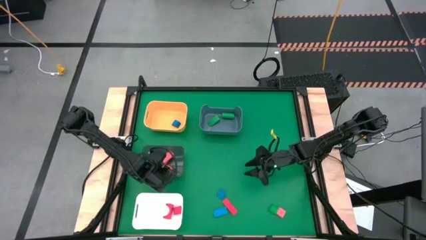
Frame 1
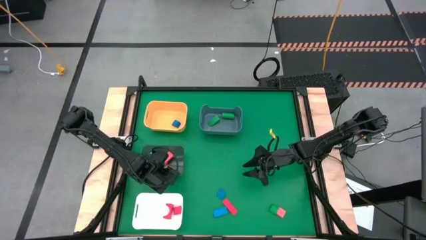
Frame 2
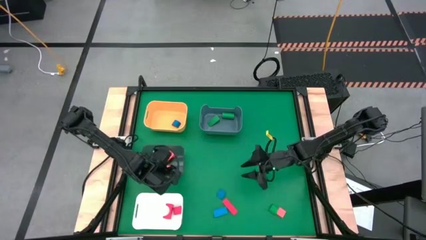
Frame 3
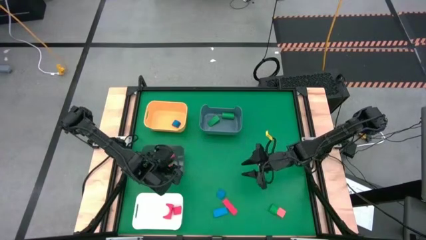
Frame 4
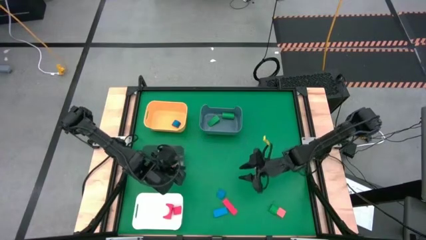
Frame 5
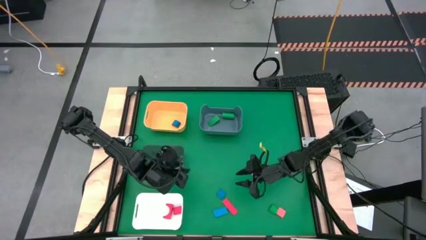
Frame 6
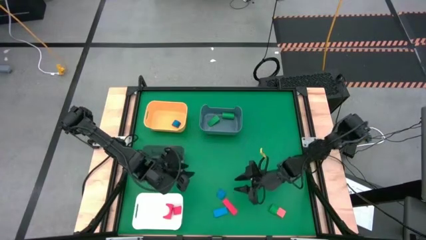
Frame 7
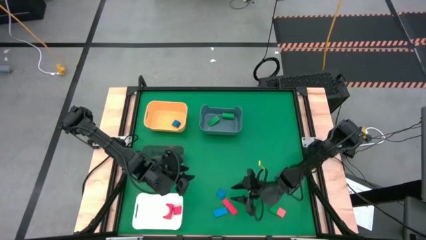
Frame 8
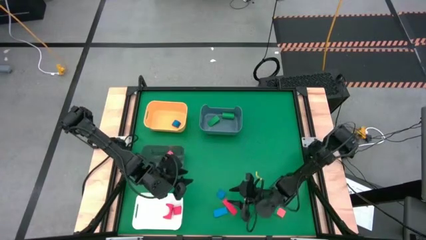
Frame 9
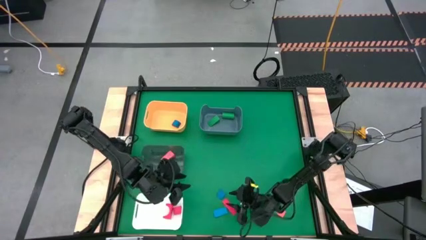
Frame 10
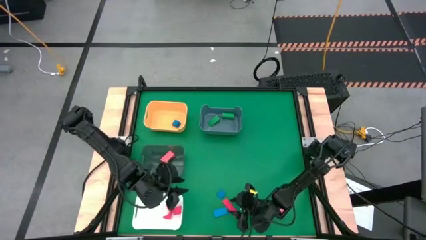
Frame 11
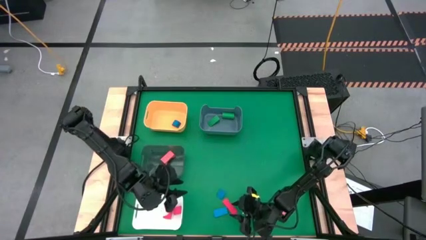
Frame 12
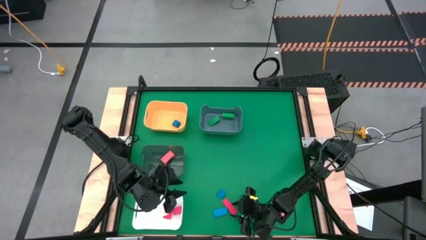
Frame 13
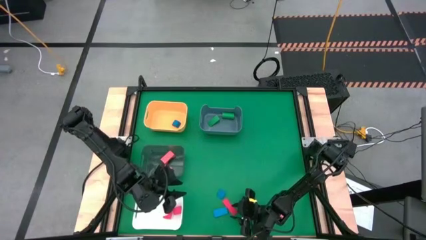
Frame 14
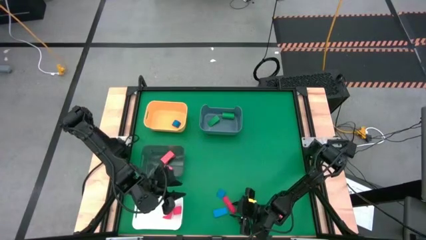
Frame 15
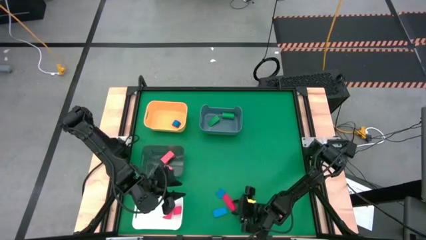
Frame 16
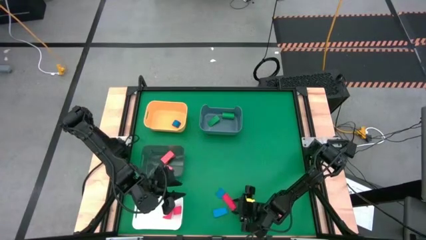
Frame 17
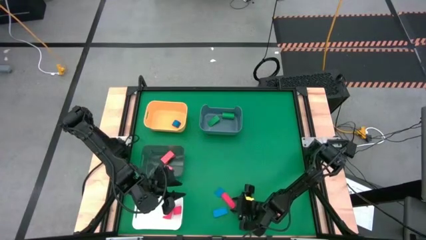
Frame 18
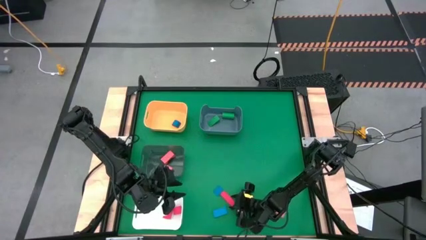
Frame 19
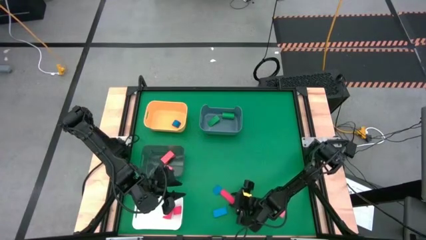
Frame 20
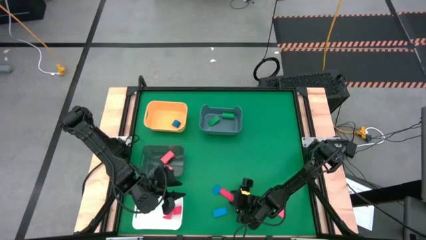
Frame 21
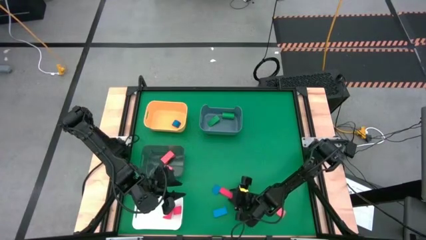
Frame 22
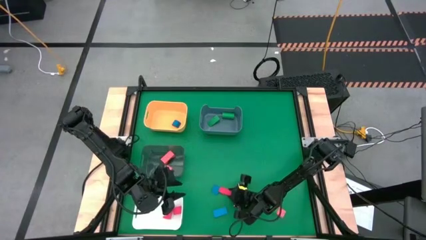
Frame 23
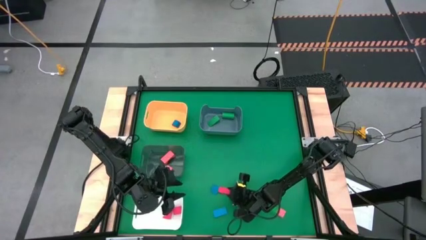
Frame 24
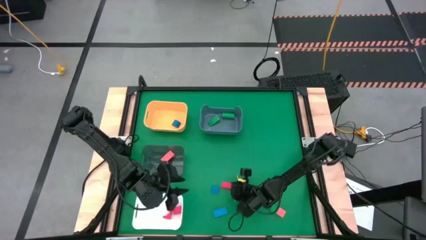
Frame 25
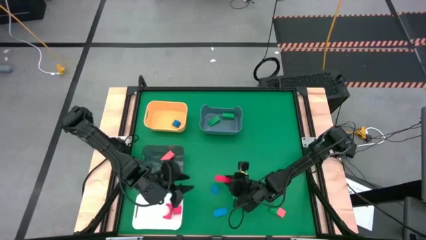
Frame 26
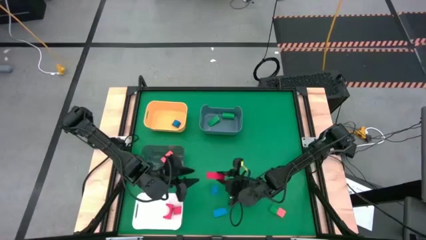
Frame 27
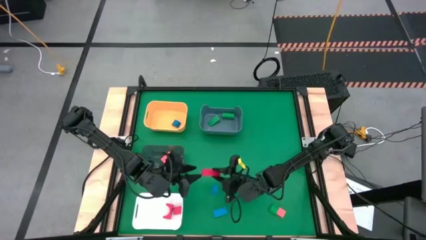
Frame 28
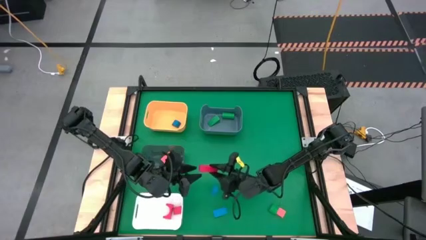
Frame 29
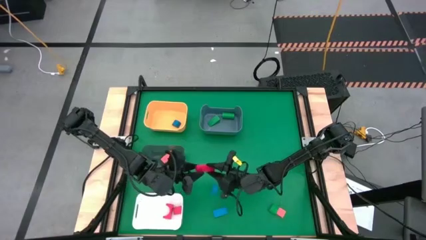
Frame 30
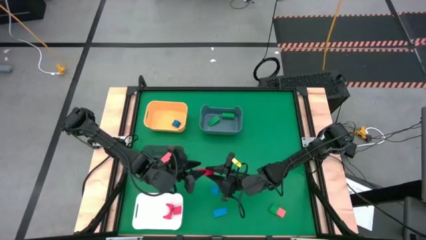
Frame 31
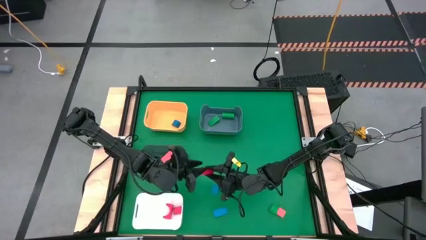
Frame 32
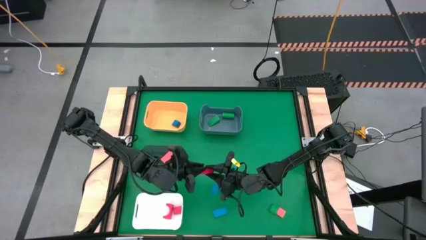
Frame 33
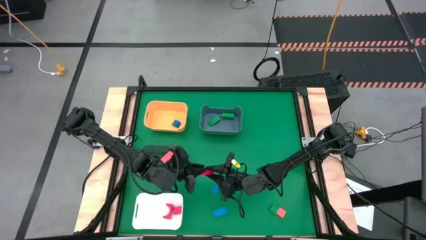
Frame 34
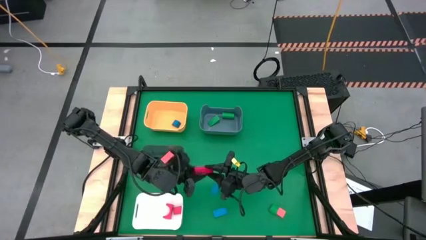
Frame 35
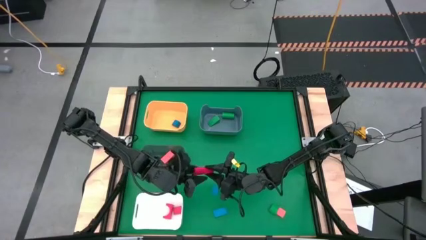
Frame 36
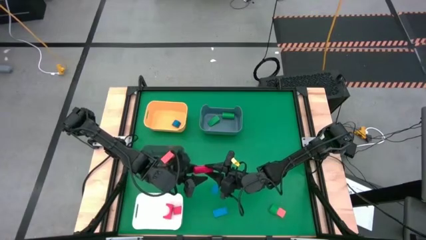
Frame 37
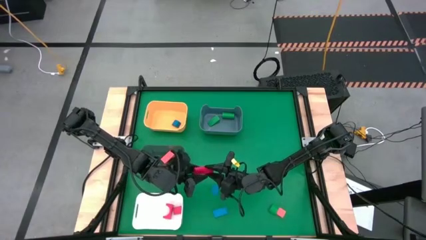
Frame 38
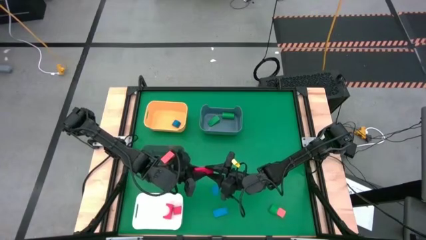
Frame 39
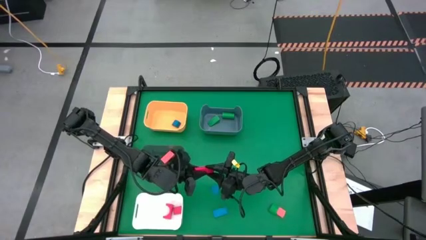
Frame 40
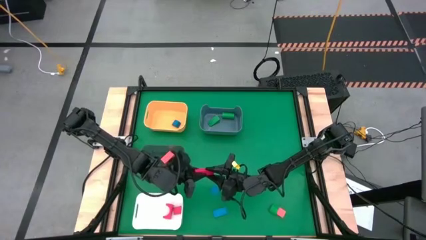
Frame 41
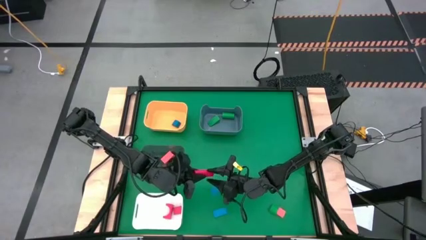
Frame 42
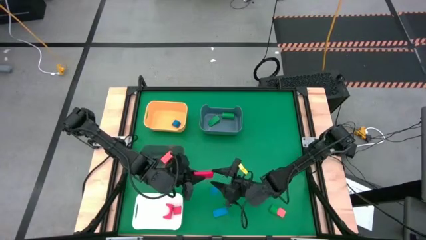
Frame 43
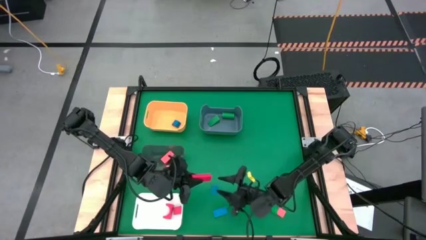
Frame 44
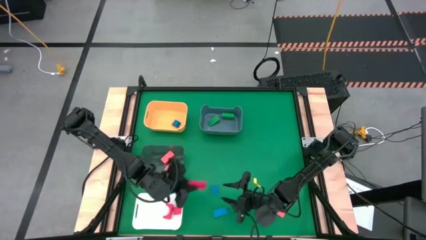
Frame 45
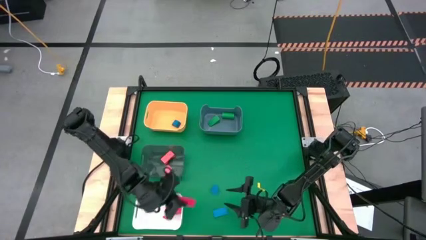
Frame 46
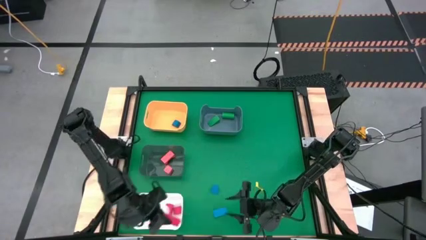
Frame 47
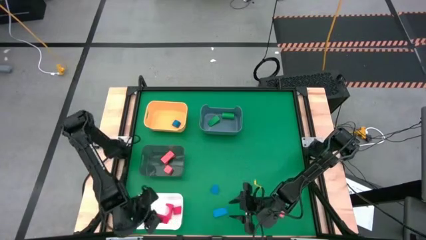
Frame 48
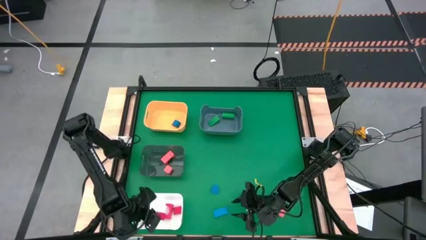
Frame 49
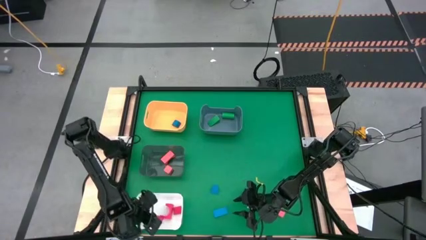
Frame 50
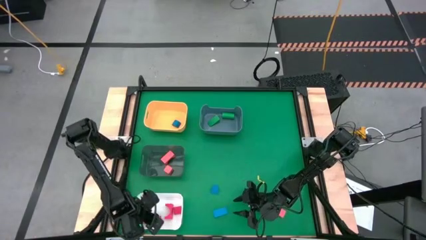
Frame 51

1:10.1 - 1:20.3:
Task: Sort & place blocks by color
Put the red rectangular block into the white bin

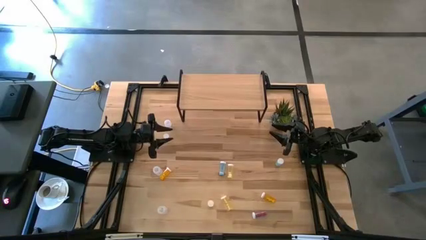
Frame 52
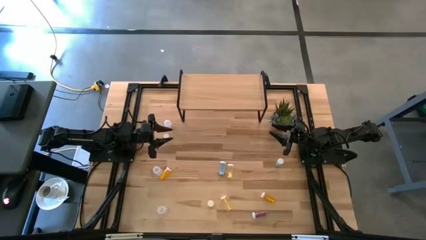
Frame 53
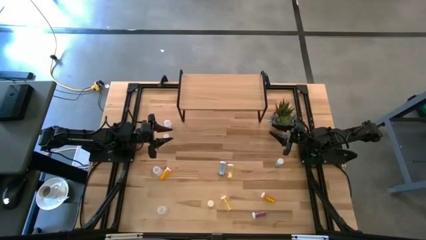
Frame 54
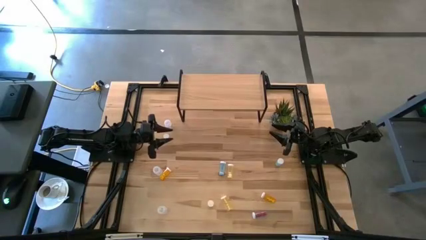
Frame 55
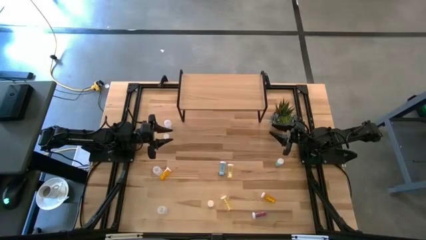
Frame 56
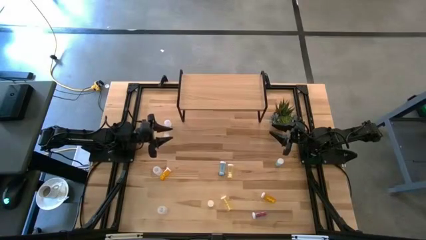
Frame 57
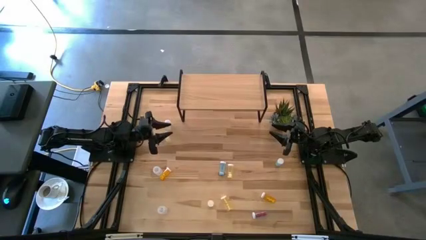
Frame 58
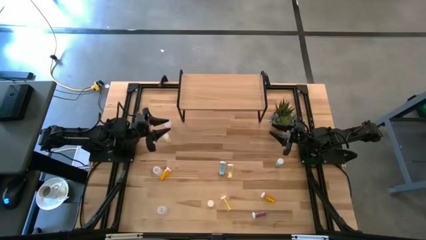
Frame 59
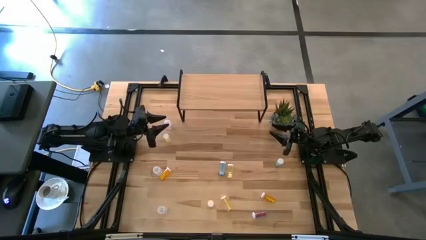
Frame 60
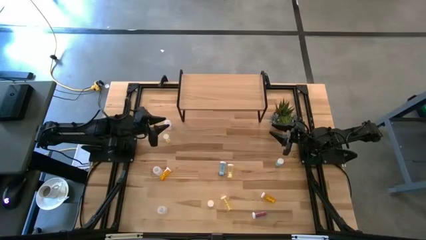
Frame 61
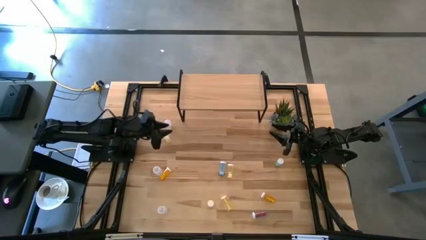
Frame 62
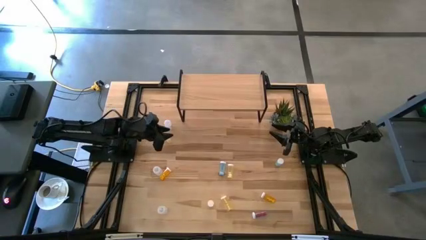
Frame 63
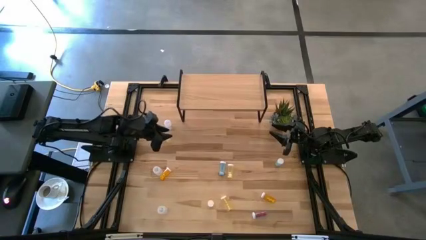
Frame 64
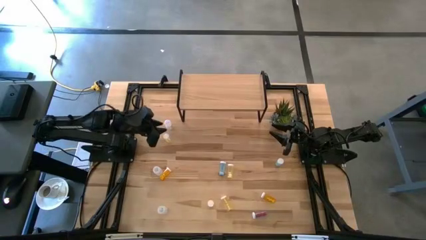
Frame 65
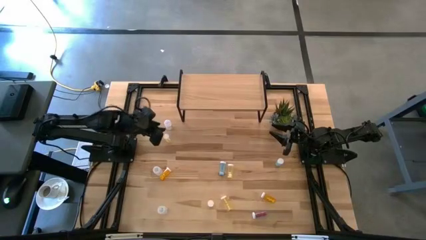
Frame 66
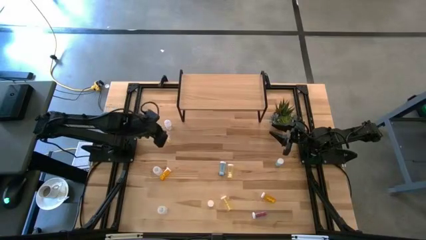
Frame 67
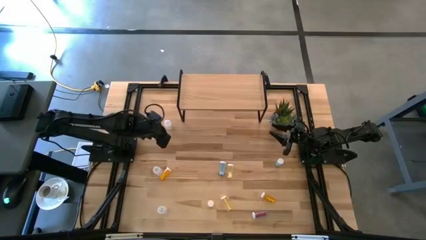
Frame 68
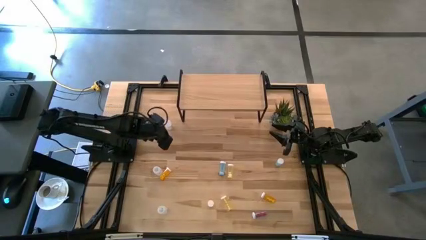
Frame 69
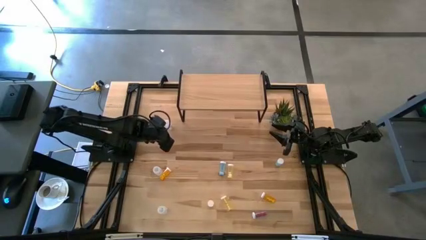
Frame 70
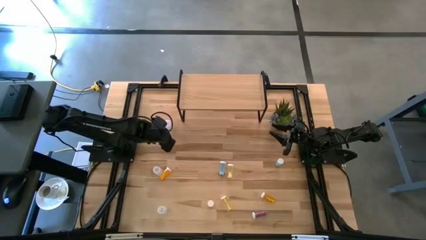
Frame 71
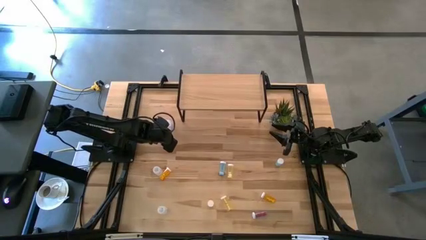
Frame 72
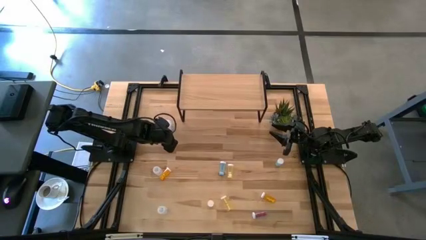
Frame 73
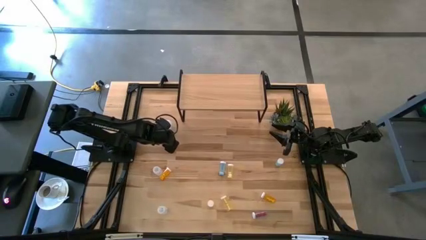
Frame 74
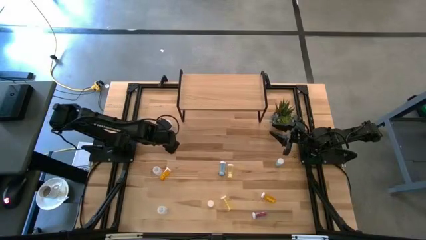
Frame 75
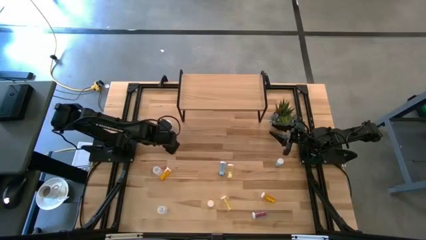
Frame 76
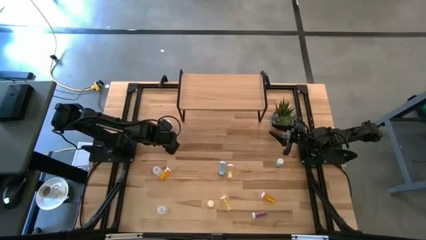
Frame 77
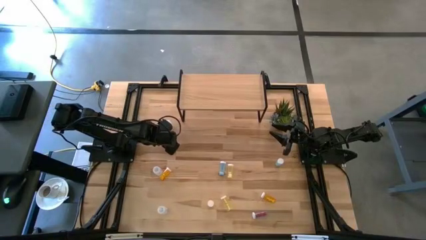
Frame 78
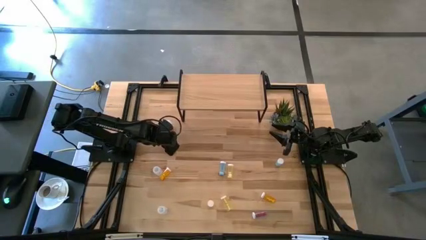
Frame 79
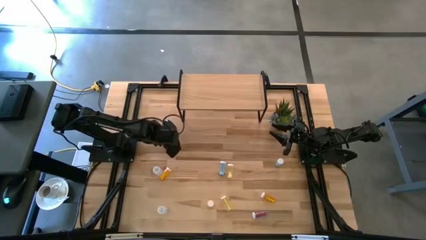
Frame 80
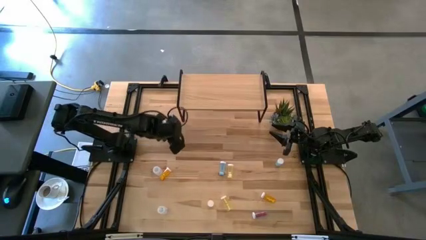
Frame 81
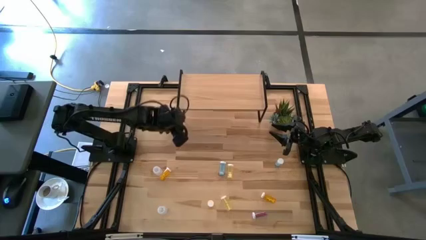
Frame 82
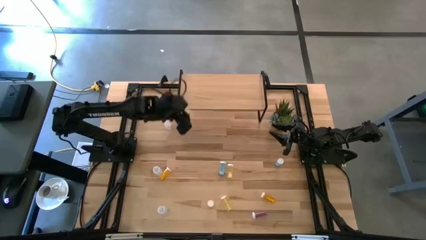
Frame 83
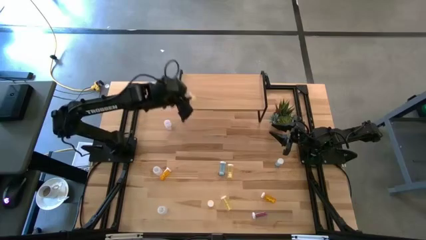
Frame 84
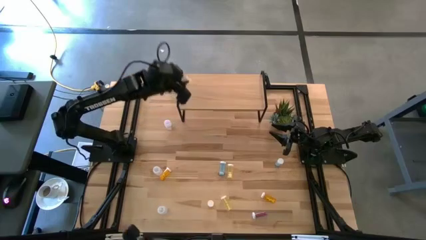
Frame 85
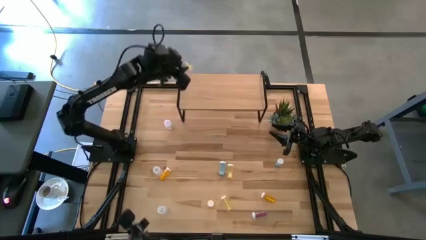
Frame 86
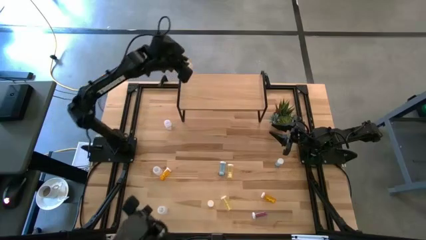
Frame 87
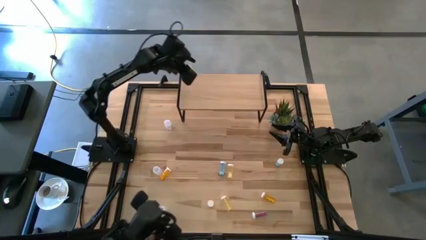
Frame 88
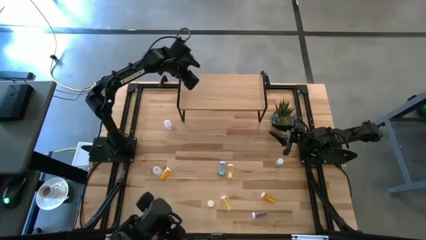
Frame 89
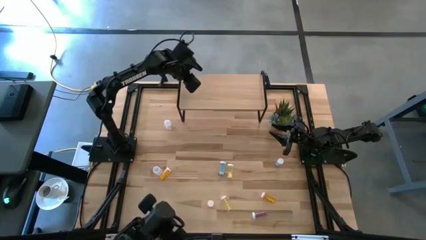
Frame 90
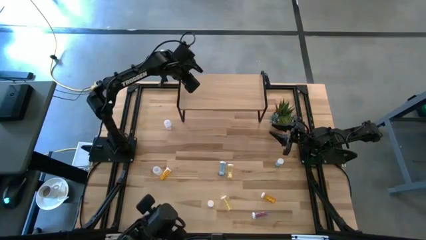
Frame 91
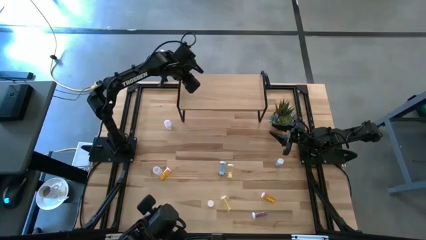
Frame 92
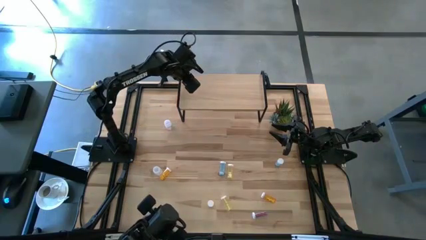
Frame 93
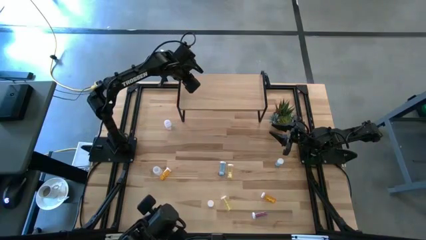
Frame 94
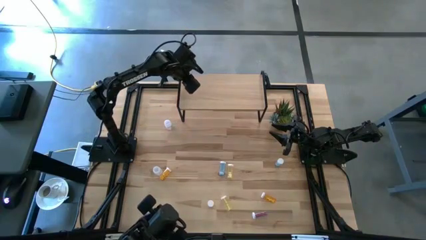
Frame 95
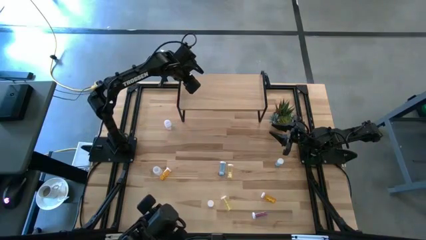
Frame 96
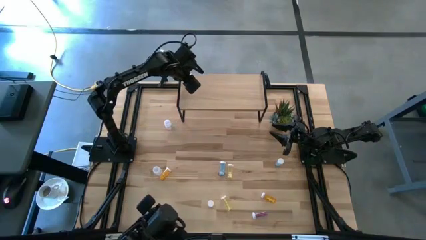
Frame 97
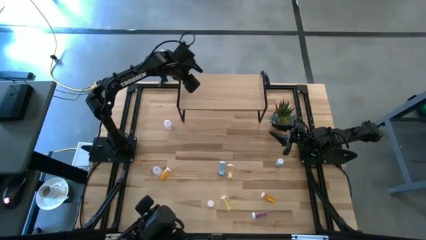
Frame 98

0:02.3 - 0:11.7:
Task: Pick and place medicine bottles onto shelf by color
Put the top left yellow pill bottle on the shelf
